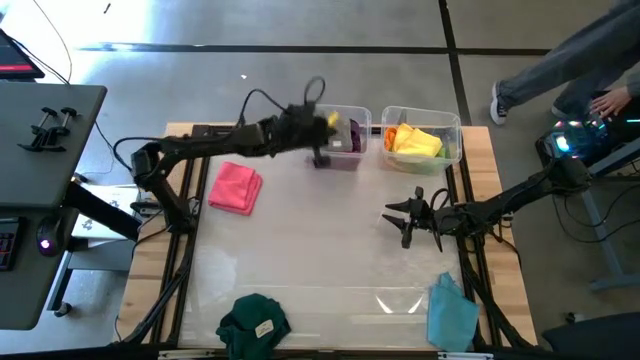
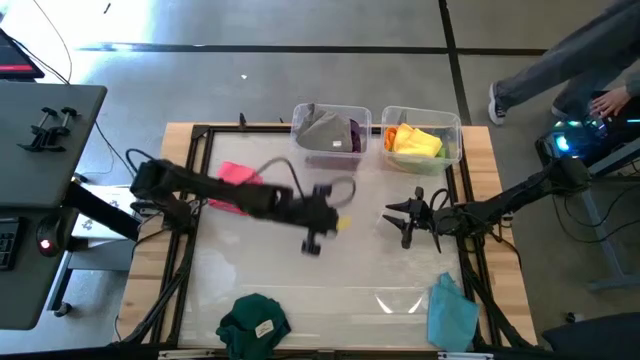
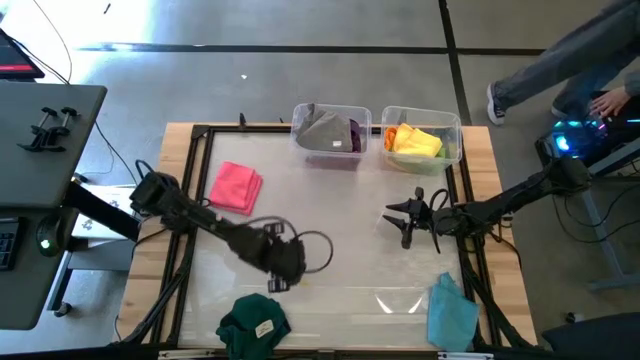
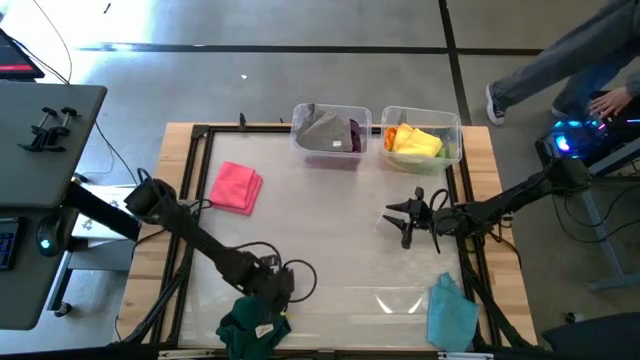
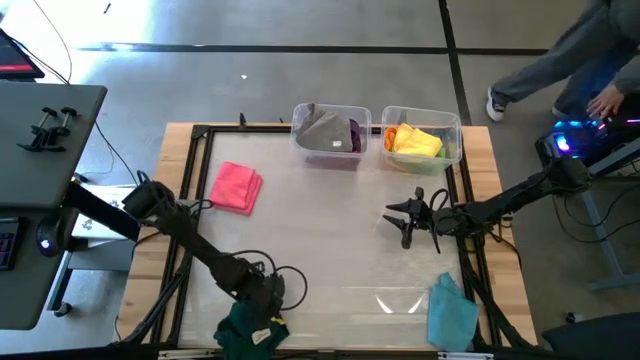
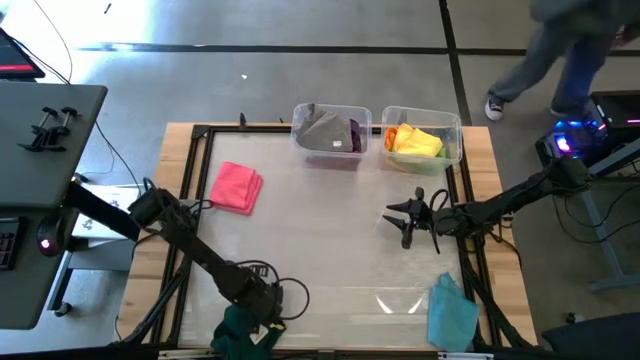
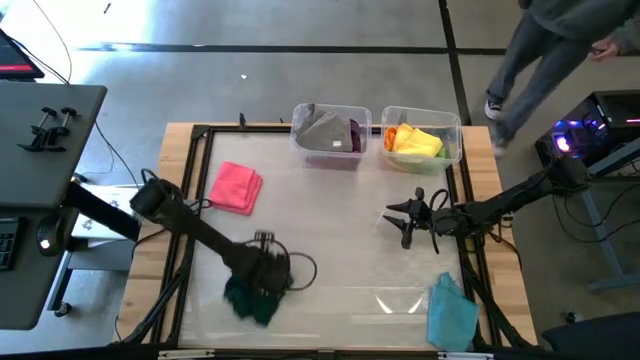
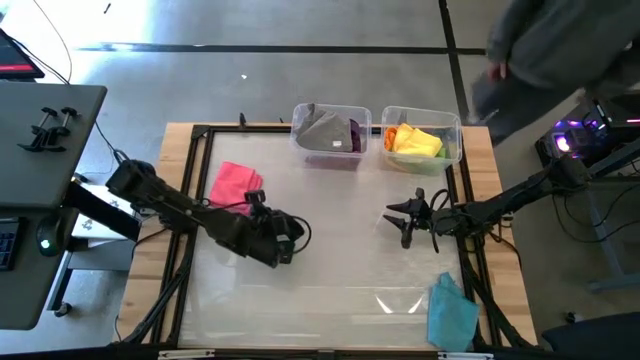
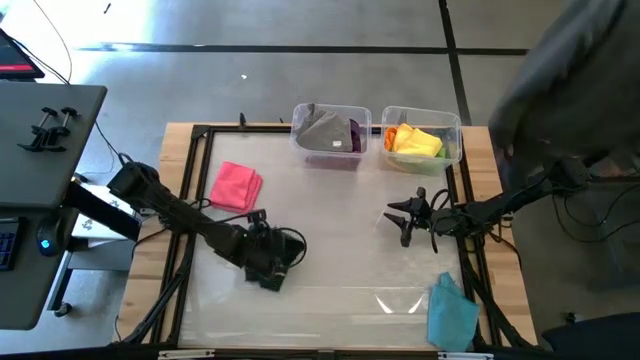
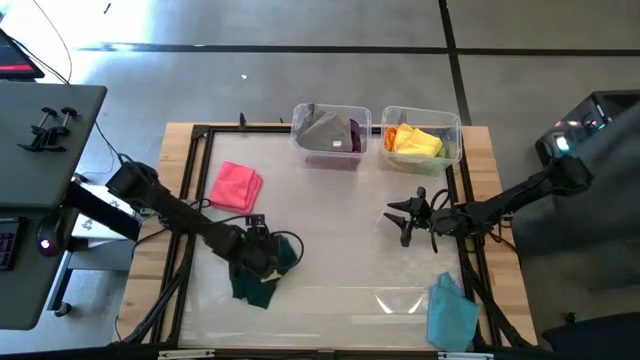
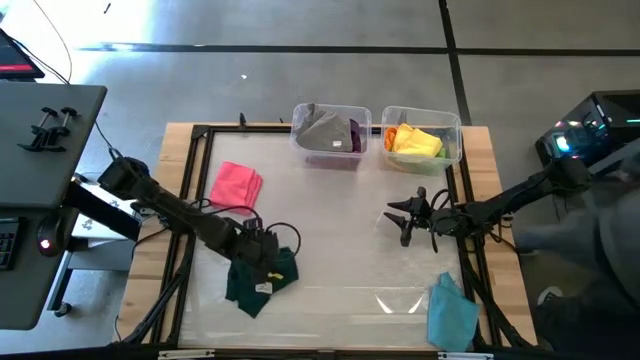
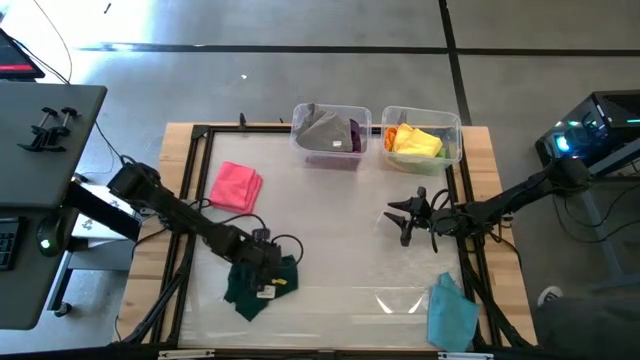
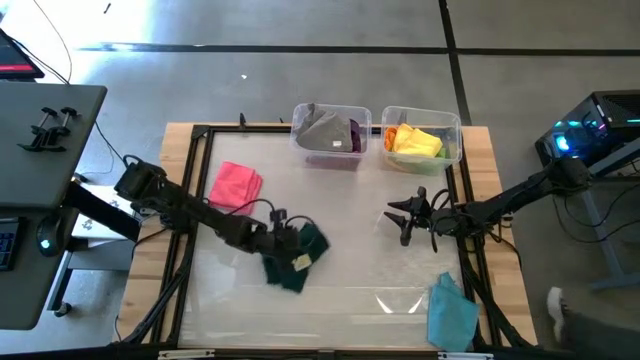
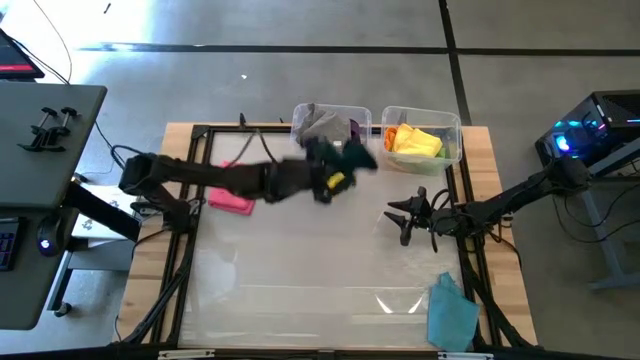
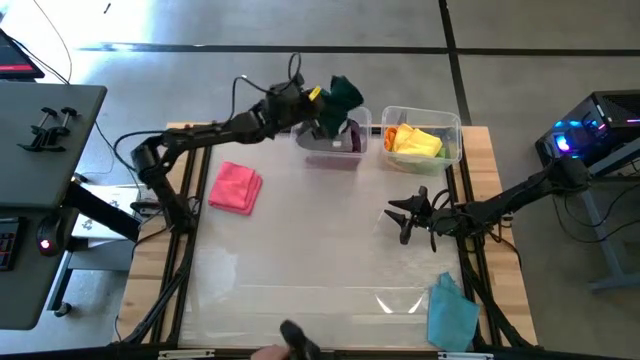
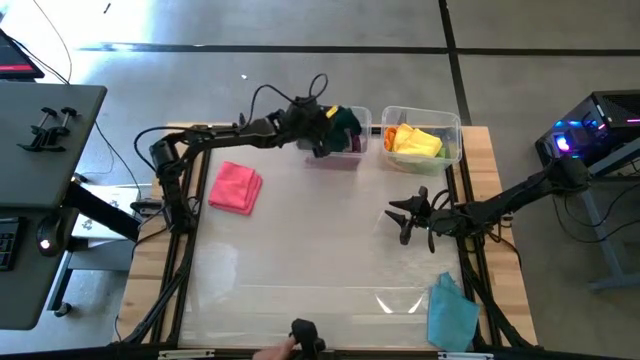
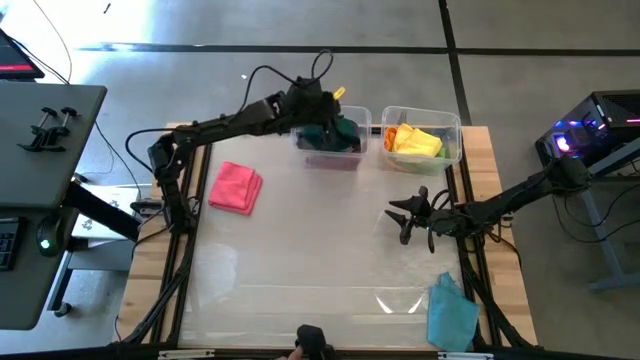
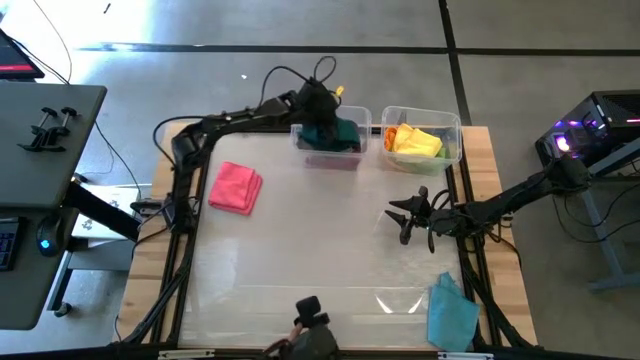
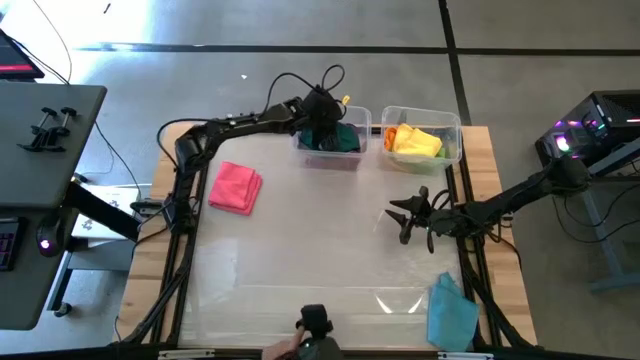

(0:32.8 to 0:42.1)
Task: Sort towels by color in basket
Put the green towel into the left transparent bin

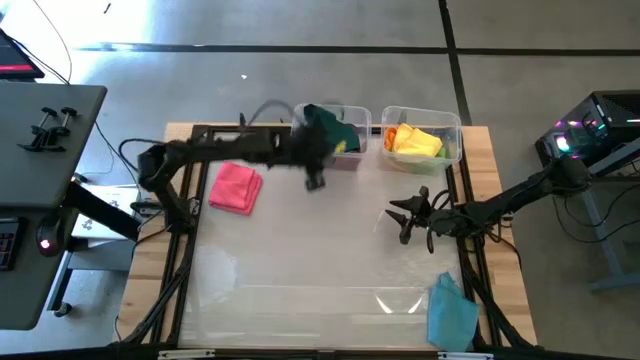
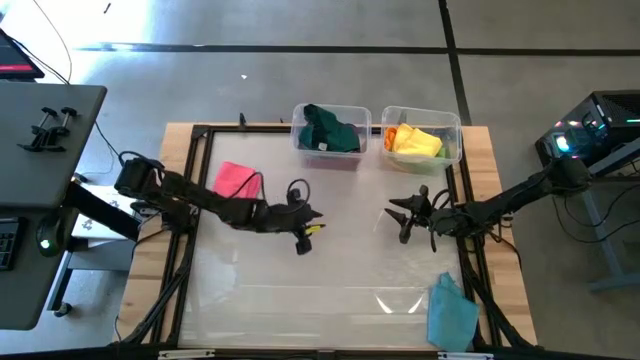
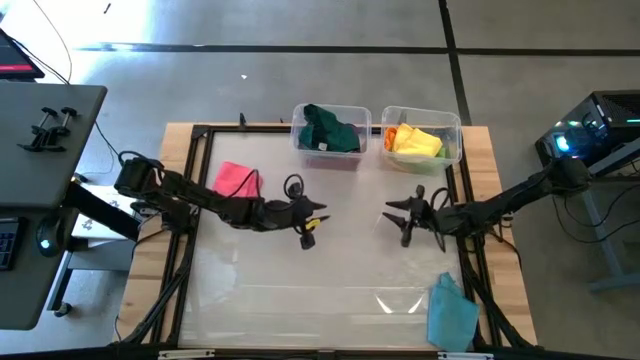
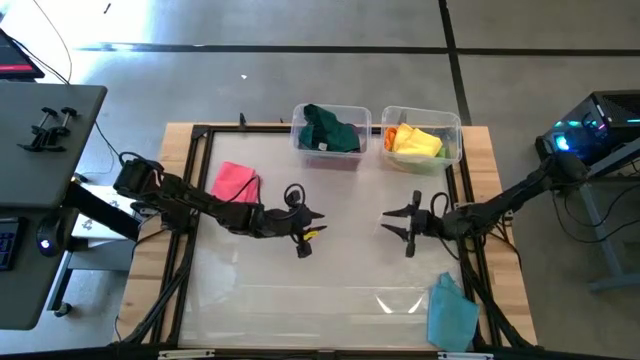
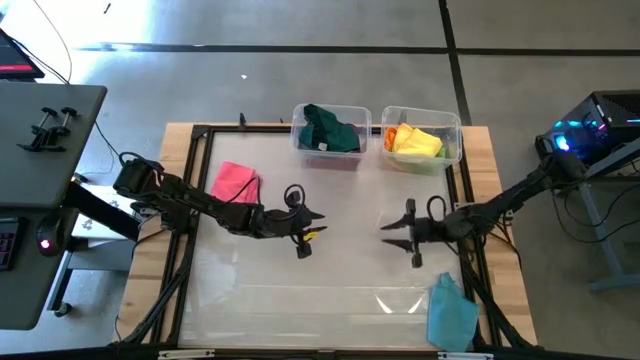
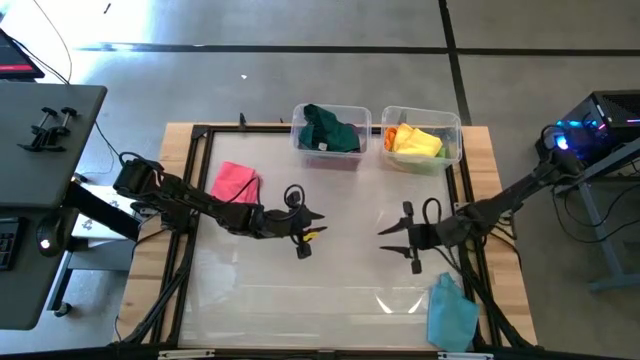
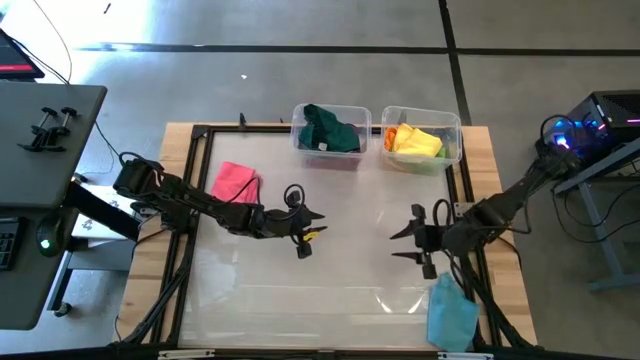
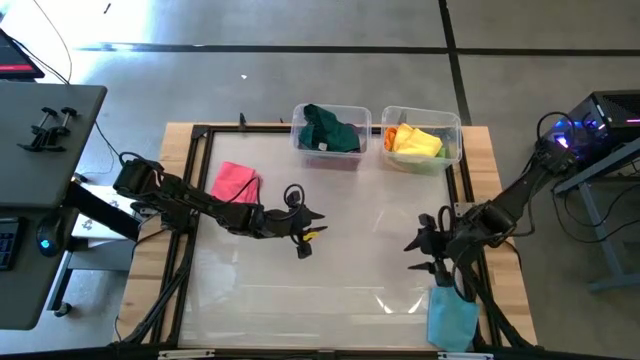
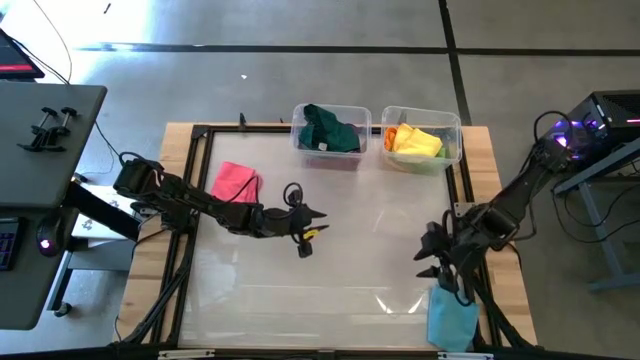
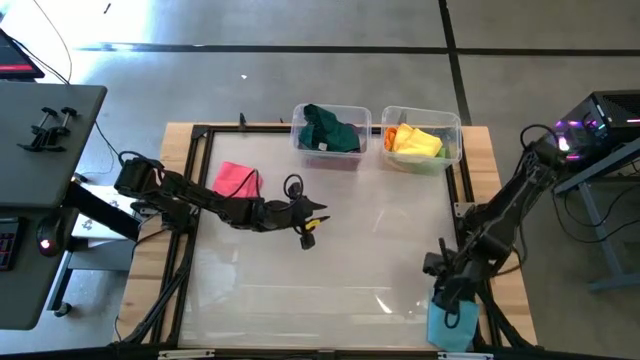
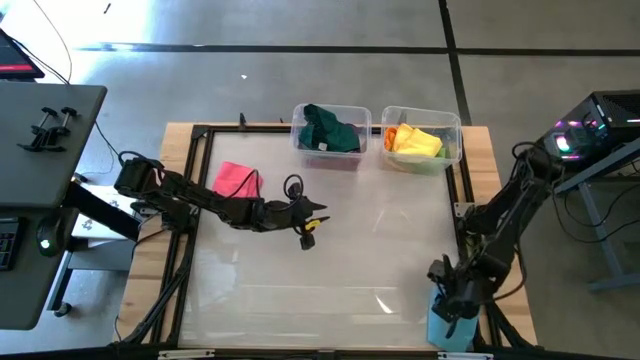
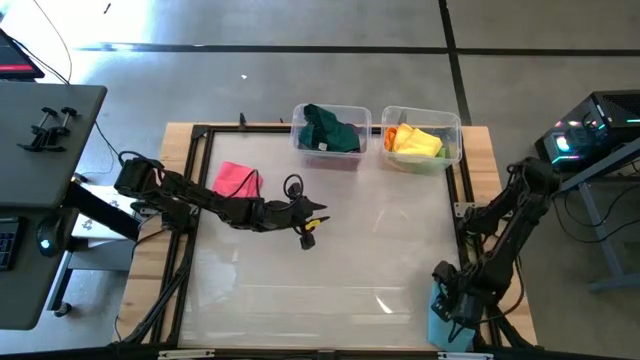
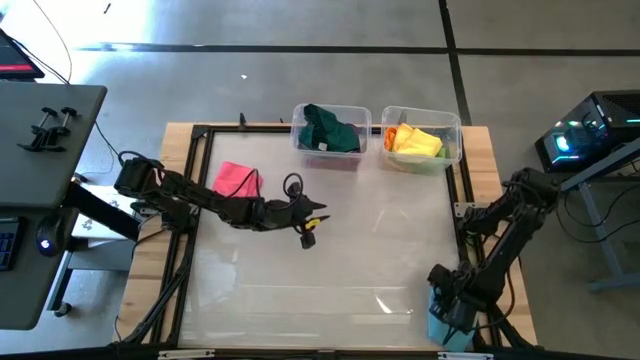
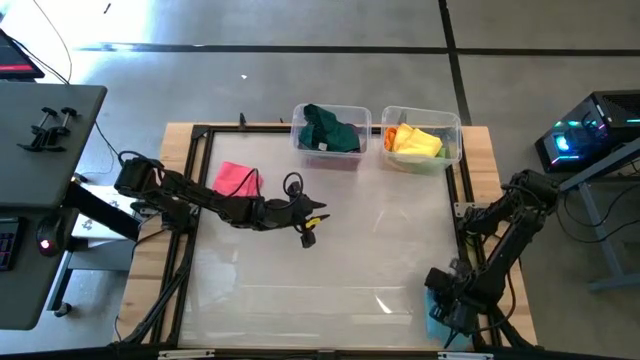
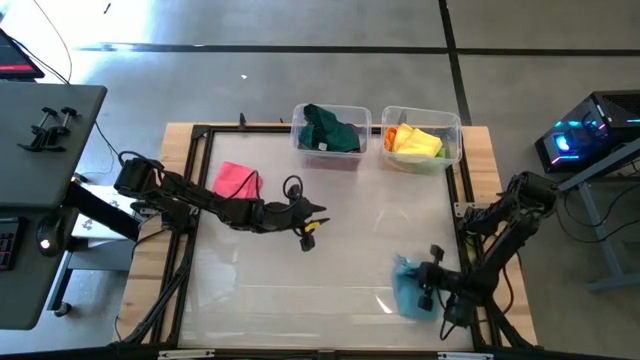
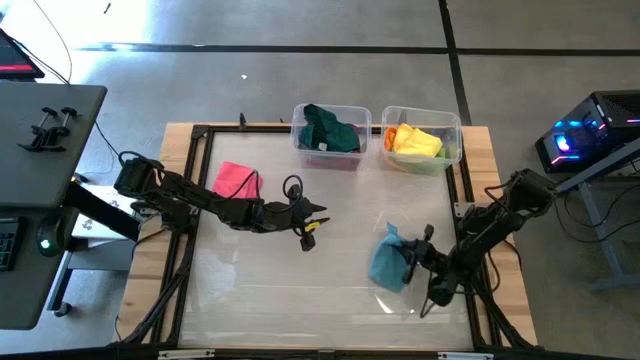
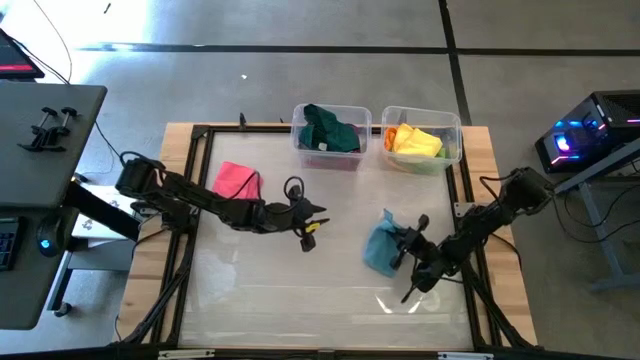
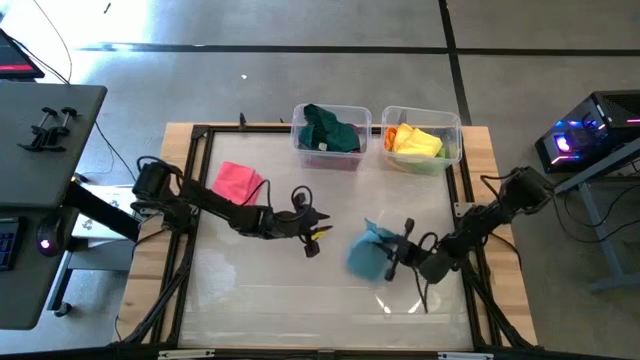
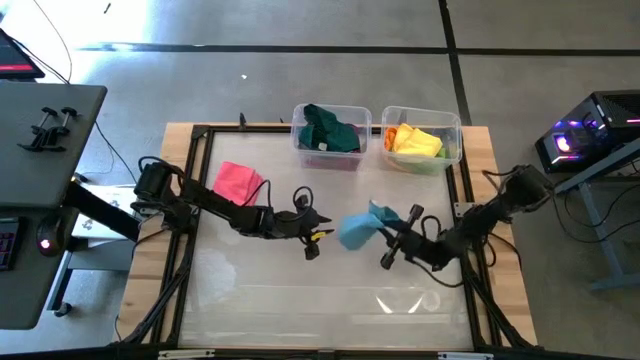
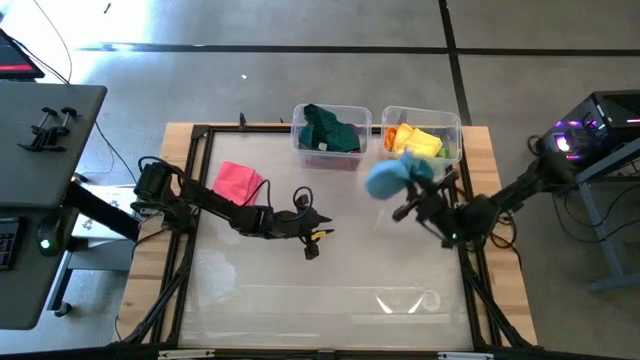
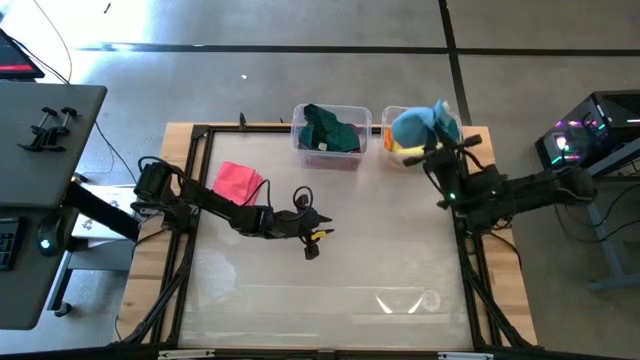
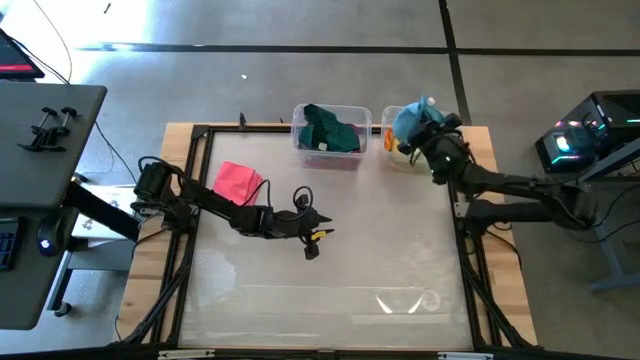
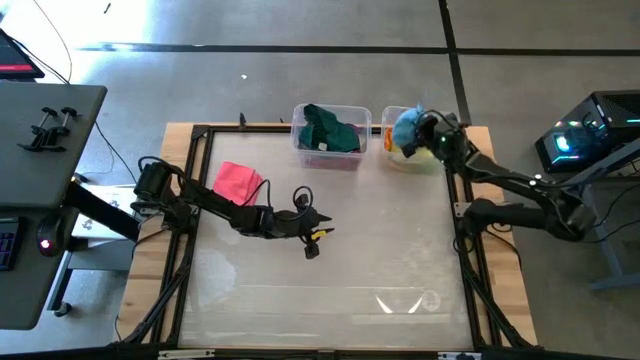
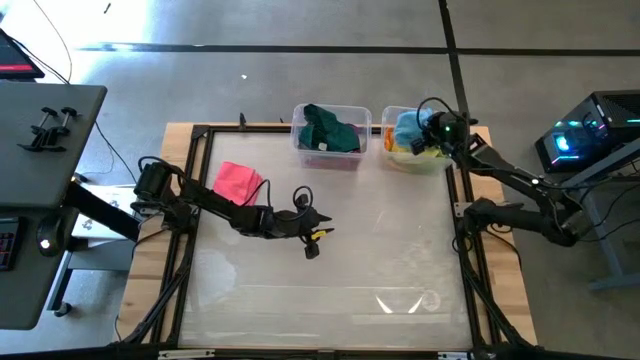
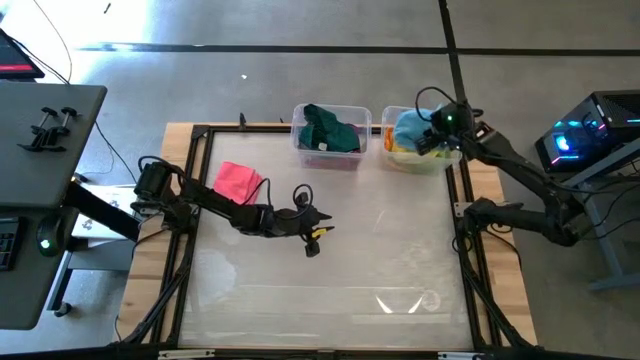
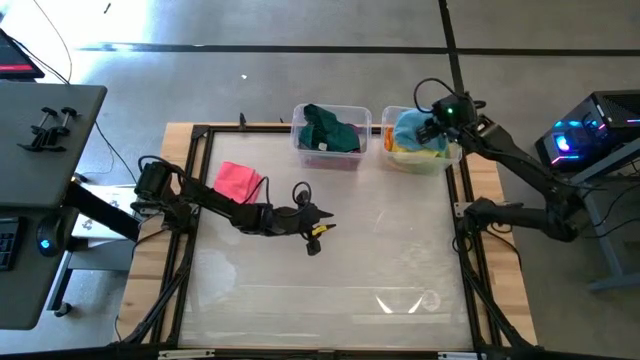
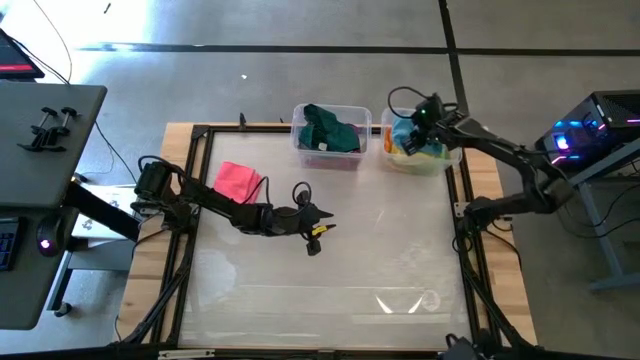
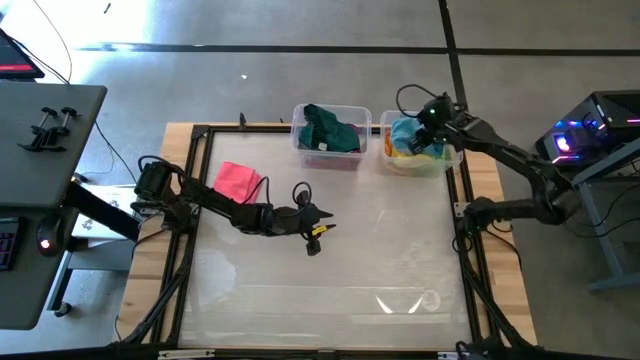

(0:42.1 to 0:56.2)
Put the blue towel into the right transparent bin
